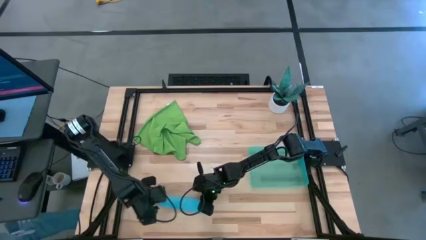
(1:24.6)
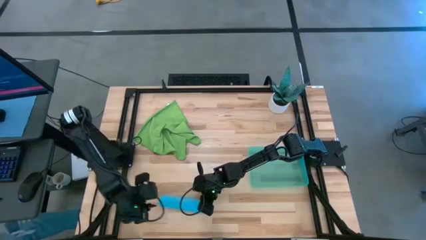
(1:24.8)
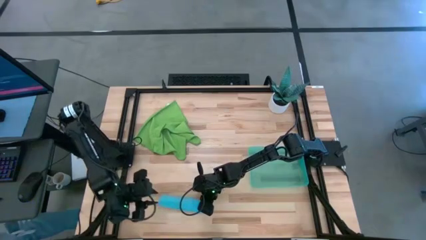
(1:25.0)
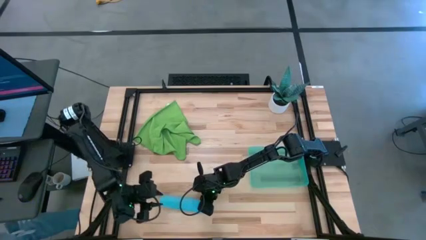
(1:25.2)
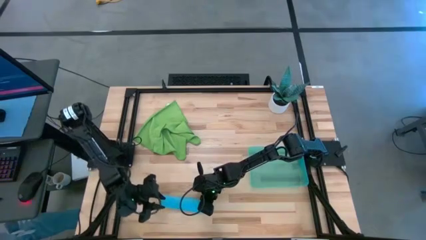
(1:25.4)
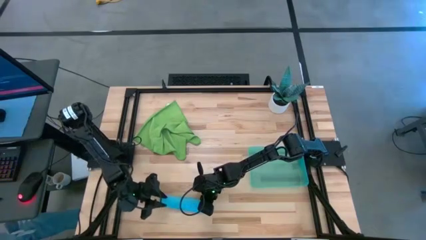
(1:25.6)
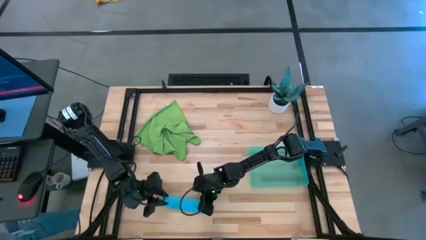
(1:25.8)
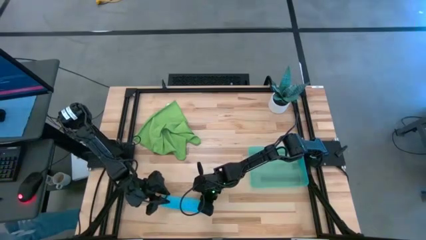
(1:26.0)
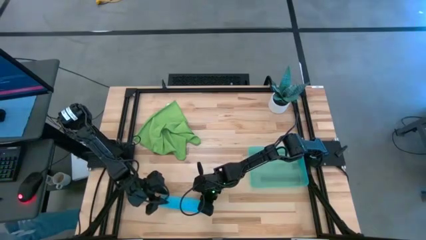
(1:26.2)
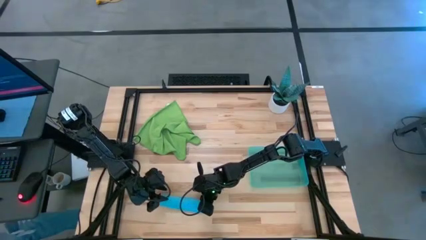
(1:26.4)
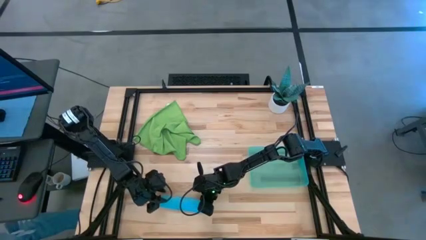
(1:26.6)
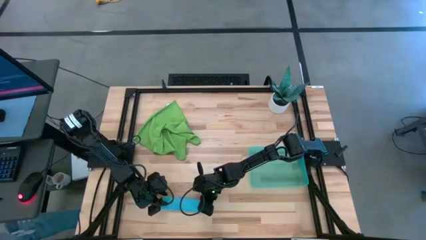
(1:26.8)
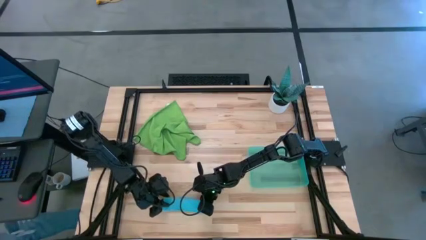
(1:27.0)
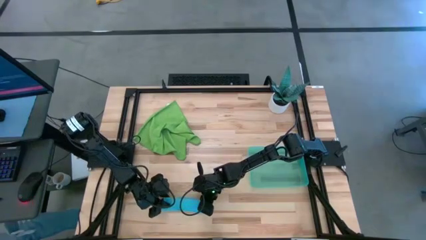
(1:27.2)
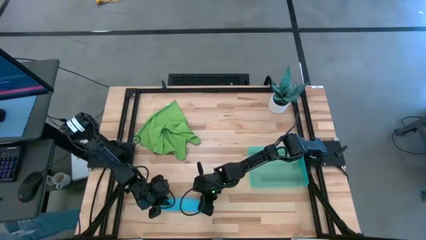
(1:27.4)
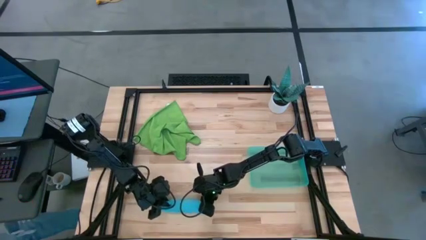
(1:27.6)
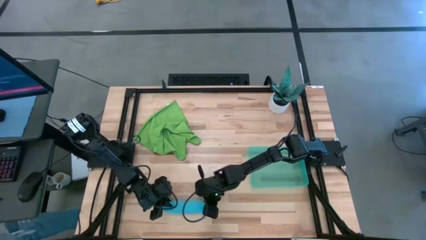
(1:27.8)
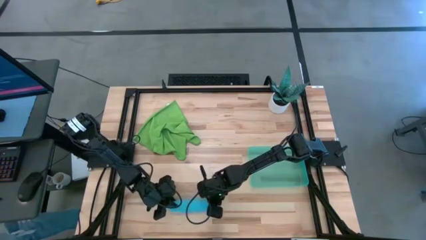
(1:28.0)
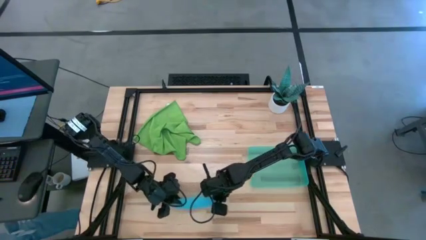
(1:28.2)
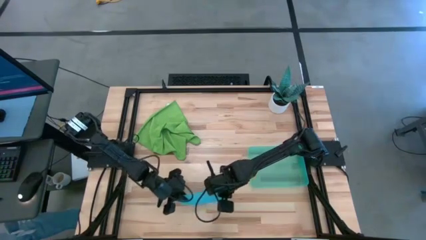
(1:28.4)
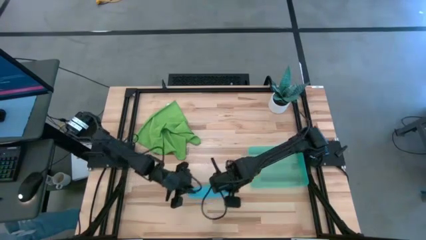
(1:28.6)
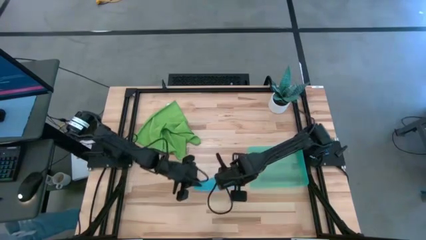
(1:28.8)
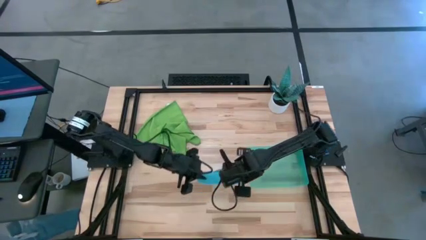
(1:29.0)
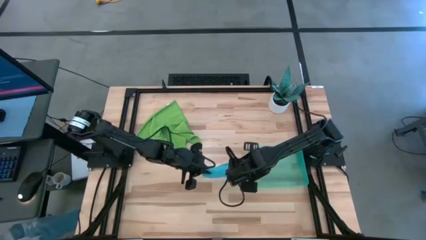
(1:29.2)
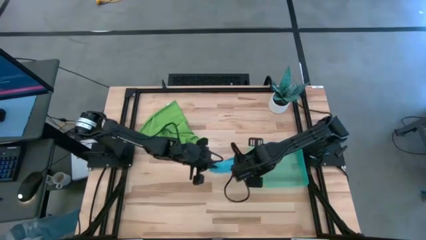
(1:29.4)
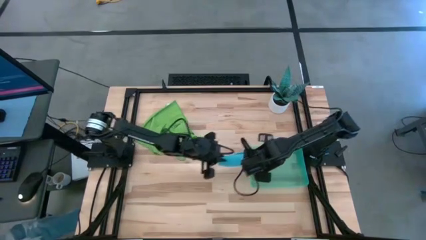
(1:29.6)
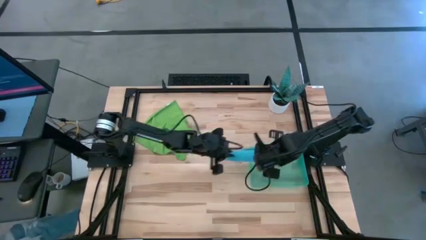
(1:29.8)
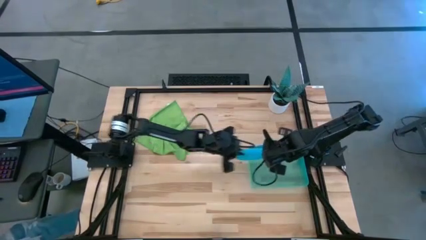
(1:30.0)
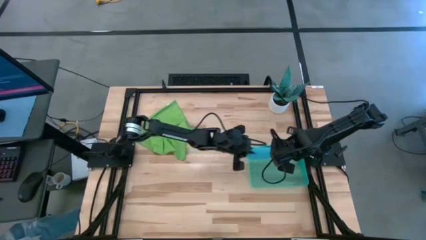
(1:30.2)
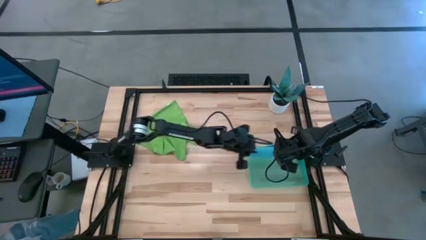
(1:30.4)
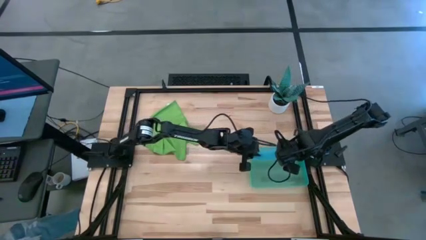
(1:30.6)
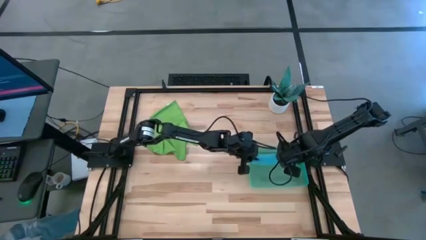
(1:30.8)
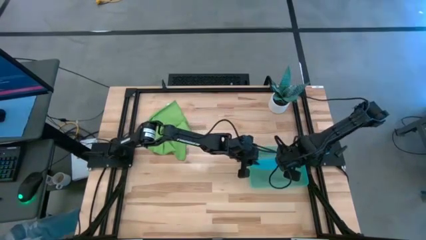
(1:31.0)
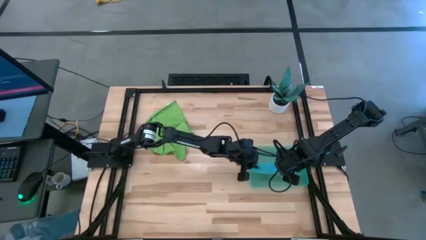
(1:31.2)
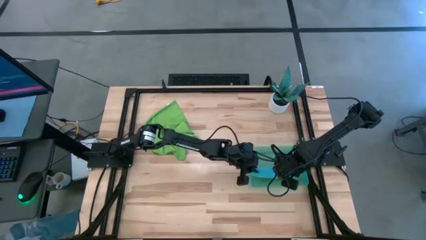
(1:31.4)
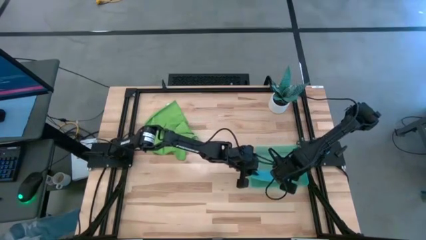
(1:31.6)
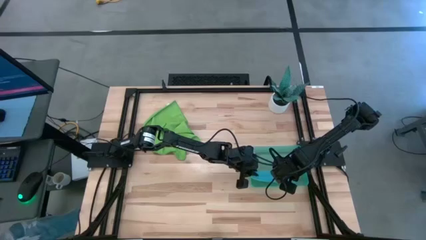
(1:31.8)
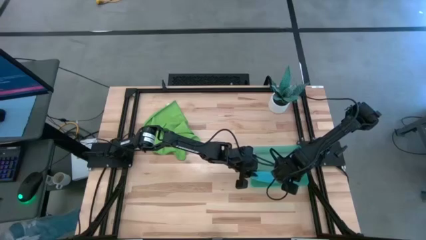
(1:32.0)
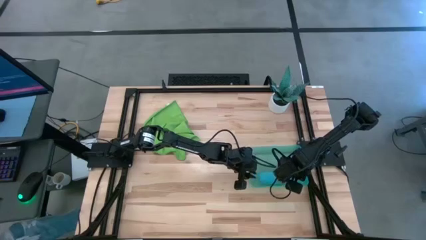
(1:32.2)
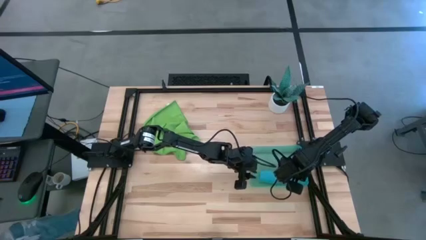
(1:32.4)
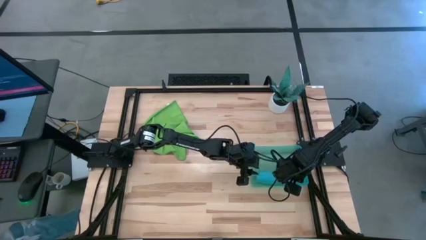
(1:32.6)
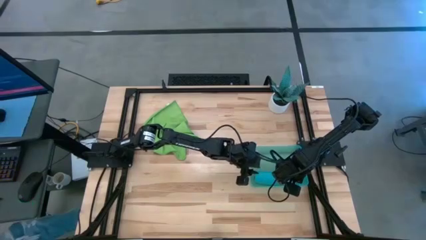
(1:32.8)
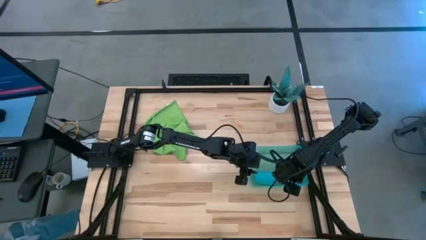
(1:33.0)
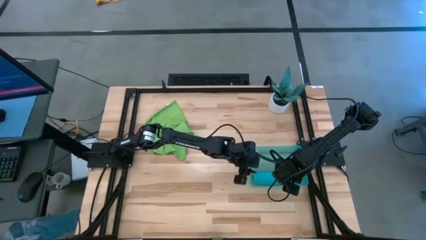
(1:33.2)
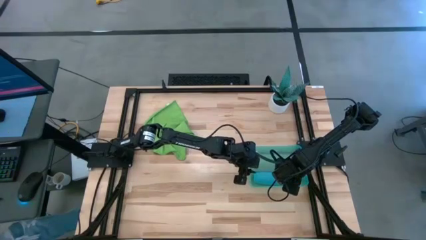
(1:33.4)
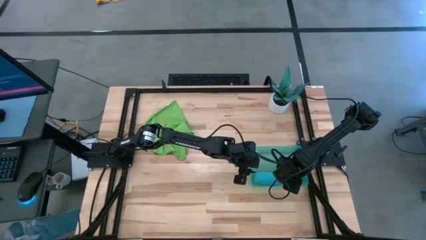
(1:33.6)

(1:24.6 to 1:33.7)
Task: Roll microfiber towels into tight, uniform cylinder then place into a basket
Put the rolled blue microfiber towel into the blue bin

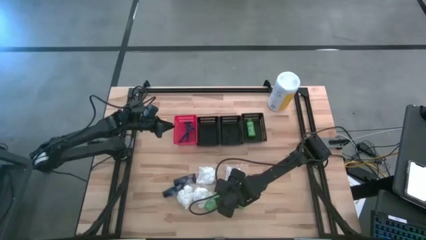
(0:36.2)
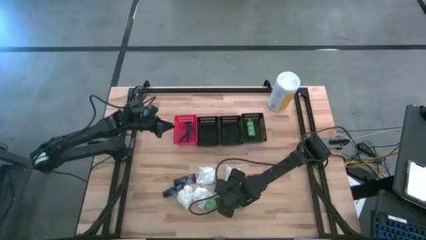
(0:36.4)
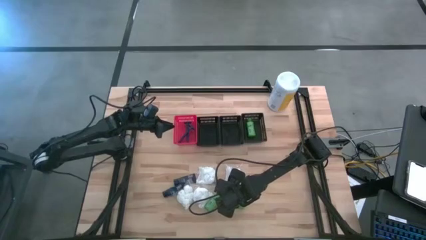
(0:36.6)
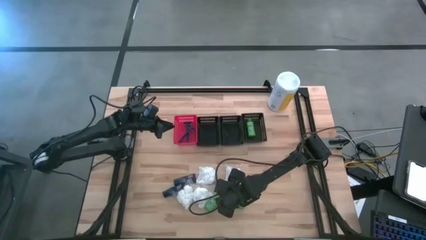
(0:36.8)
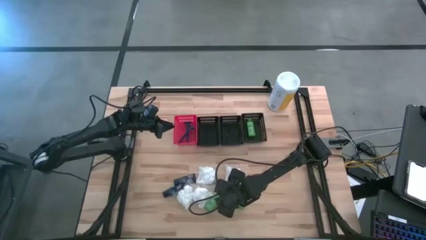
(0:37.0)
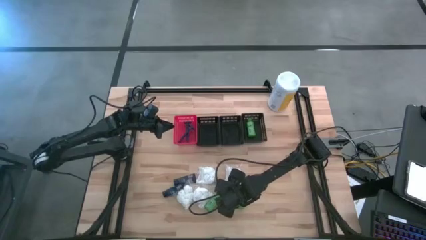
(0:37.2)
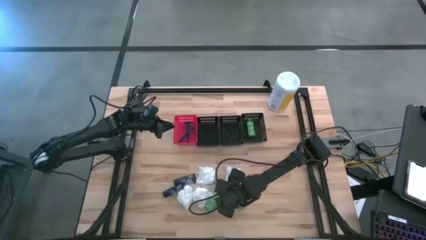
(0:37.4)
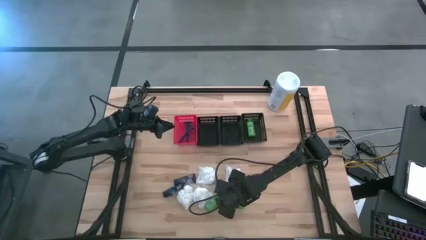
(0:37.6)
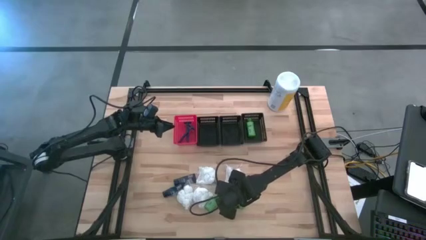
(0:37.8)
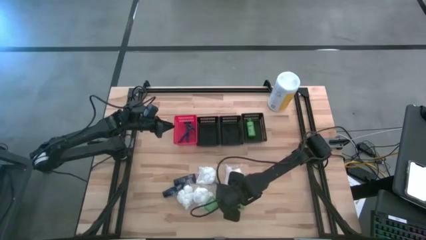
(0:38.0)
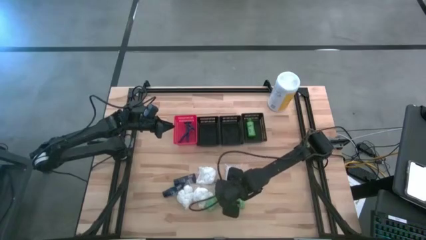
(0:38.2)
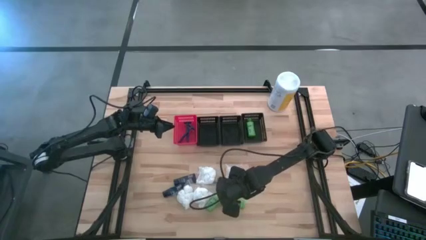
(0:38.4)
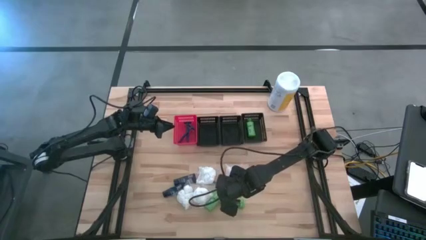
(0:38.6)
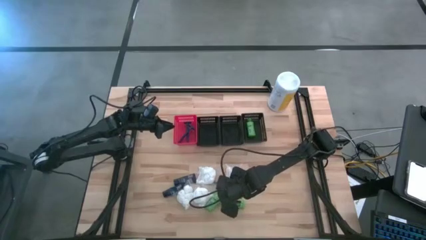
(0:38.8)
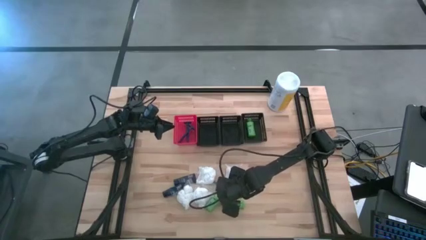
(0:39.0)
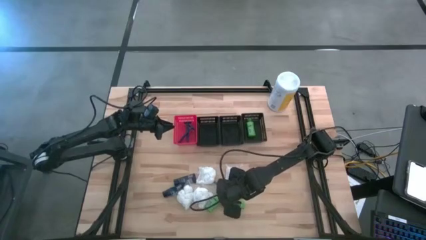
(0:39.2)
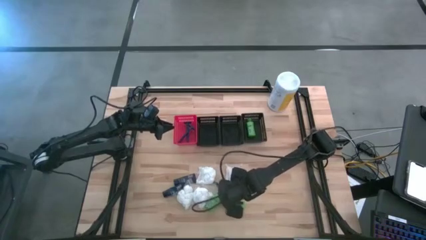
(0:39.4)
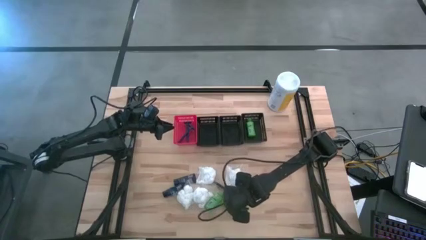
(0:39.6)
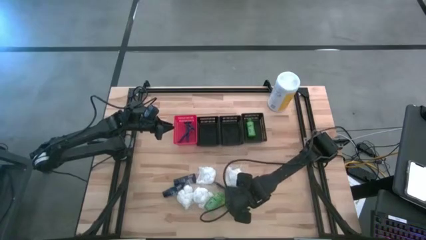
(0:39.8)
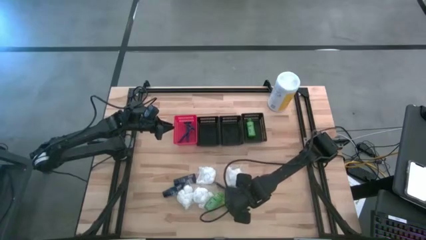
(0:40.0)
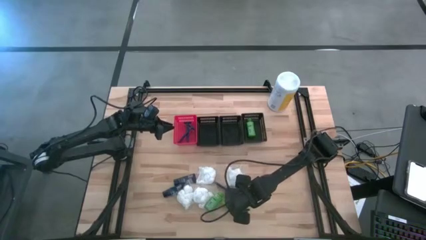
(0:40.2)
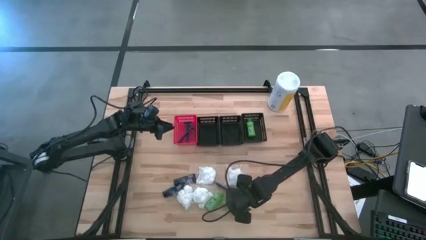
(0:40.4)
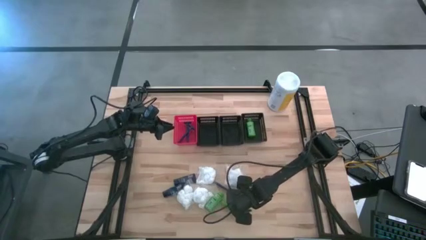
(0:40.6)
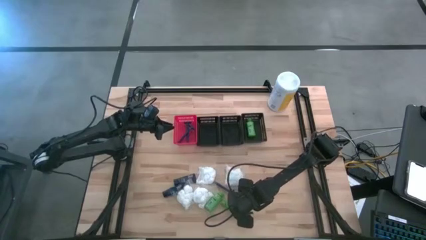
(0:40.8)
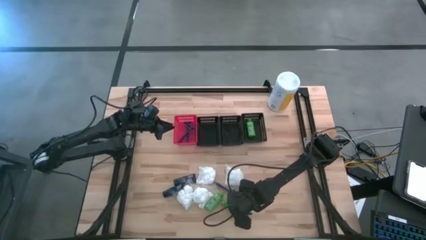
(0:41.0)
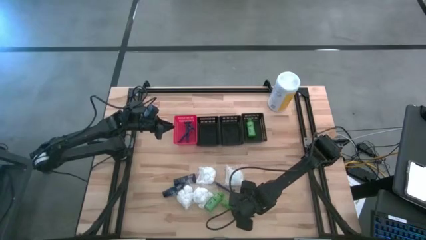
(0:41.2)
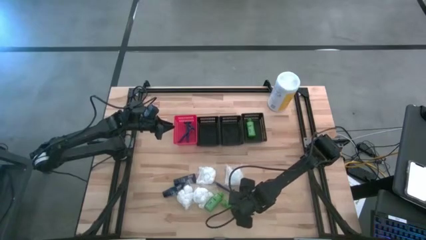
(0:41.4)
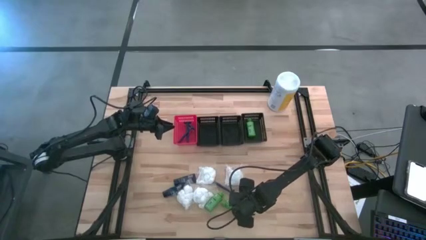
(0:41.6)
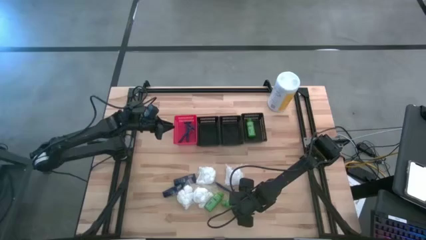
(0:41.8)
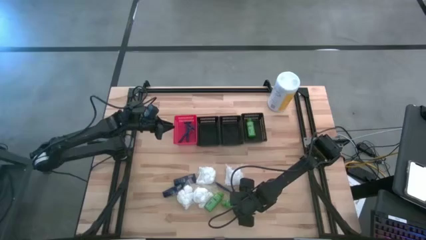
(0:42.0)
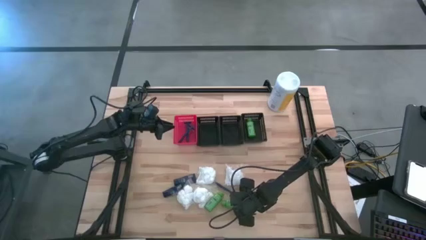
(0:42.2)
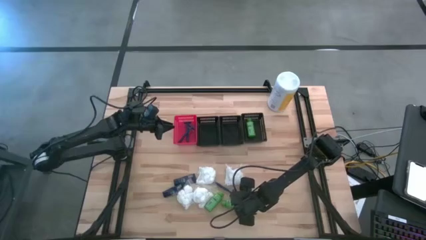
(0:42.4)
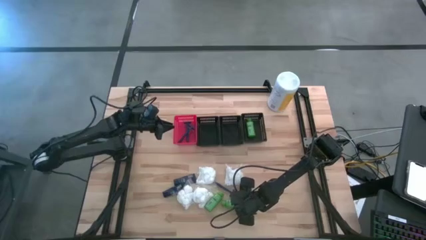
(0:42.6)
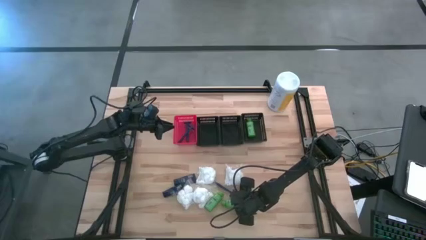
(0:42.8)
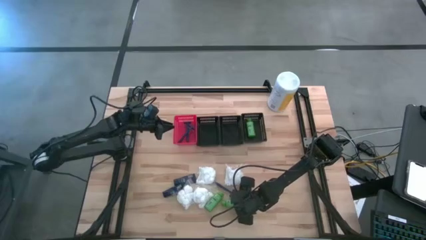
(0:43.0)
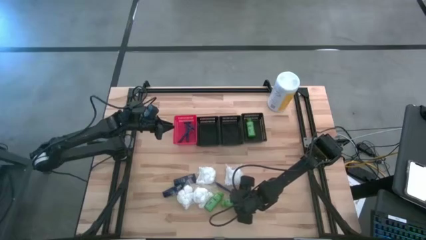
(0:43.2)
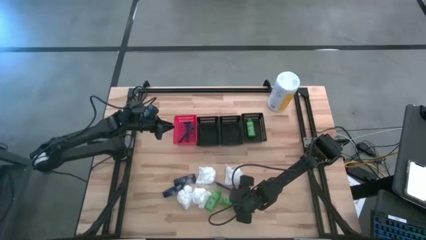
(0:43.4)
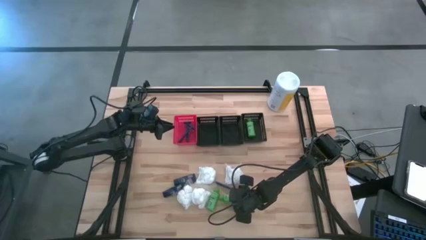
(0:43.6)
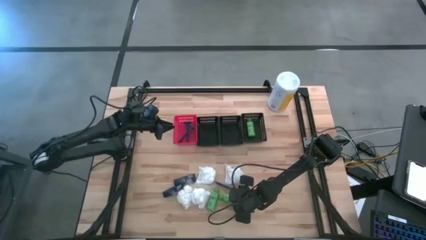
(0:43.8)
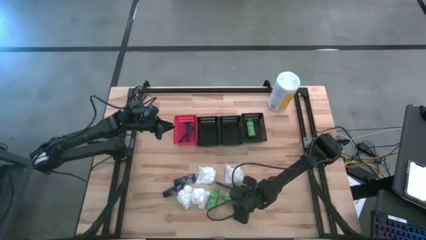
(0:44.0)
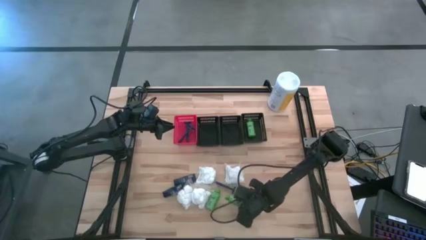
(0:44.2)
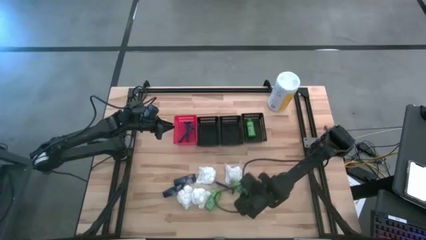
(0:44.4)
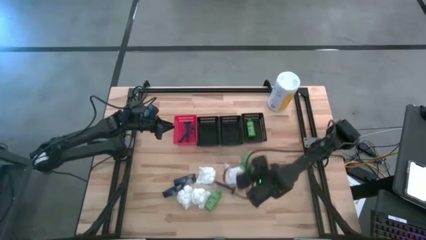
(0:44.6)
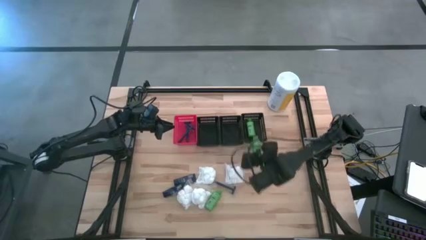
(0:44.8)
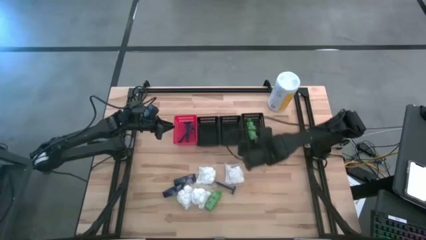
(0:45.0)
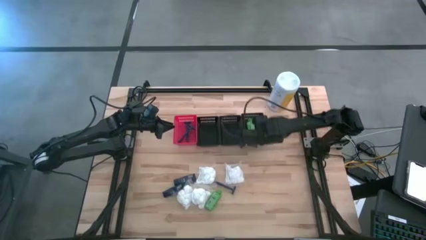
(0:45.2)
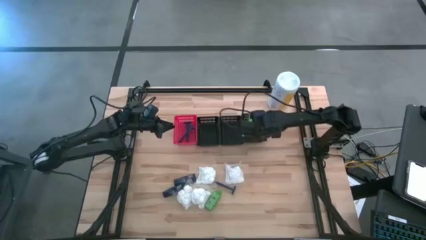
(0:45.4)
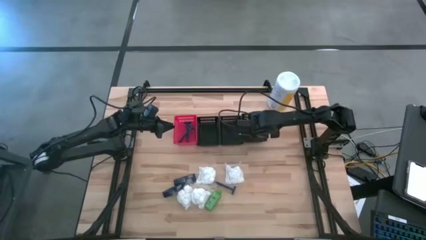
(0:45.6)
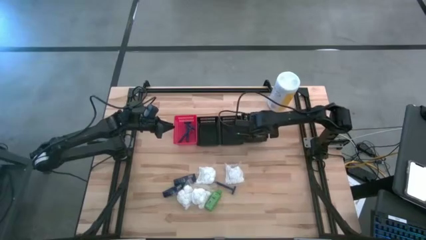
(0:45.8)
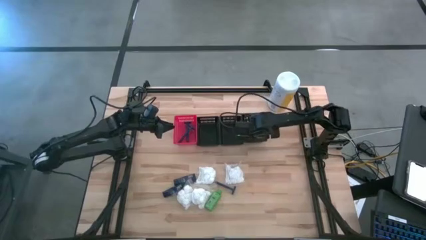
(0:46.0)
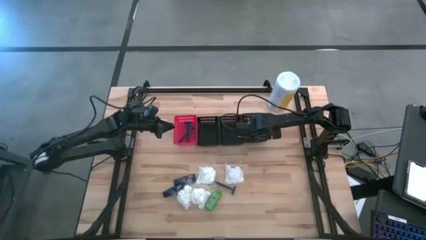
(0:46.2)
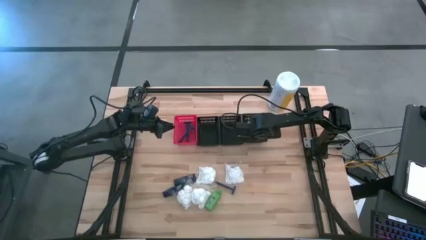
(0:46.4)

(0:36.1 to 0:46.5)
Task: Pick & Place Travel size toiletries
Put the shampoo into the right black bin
